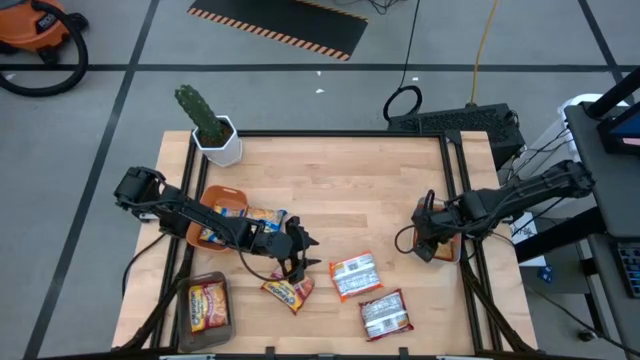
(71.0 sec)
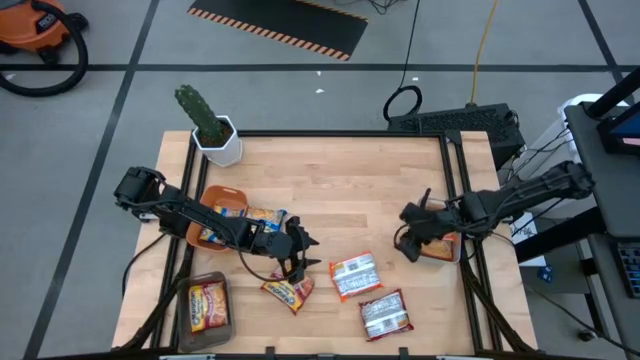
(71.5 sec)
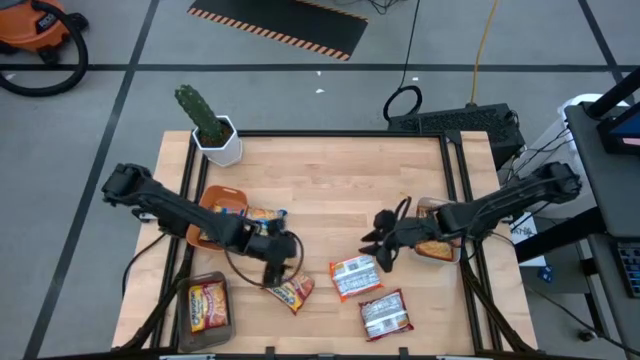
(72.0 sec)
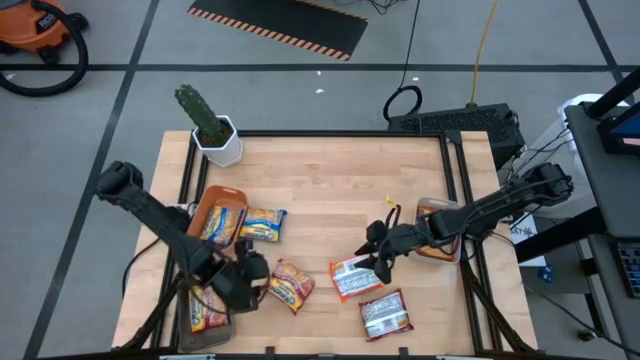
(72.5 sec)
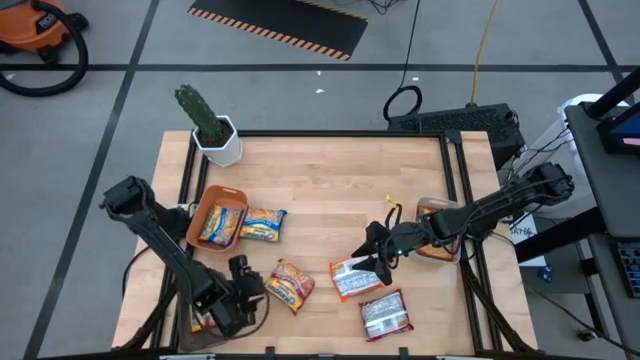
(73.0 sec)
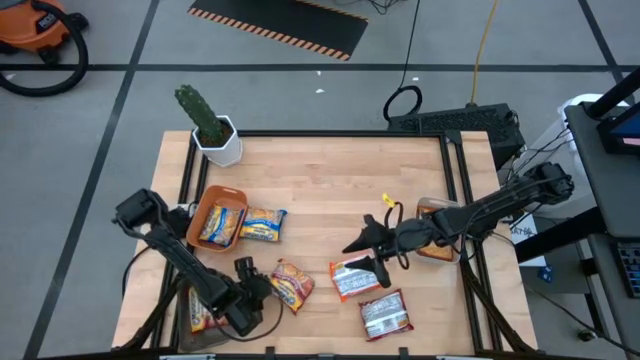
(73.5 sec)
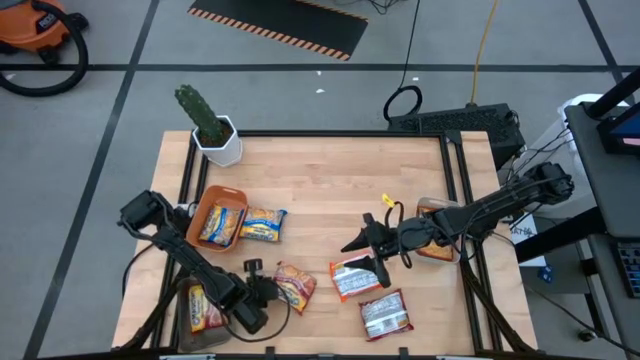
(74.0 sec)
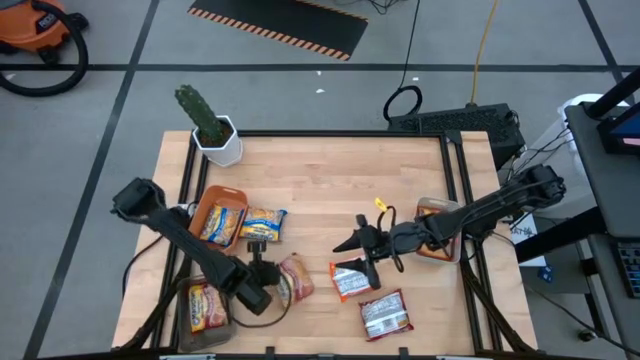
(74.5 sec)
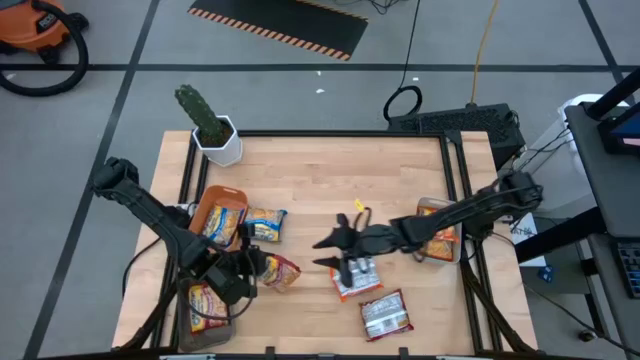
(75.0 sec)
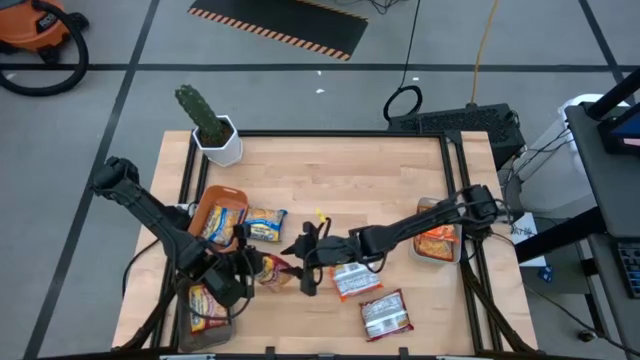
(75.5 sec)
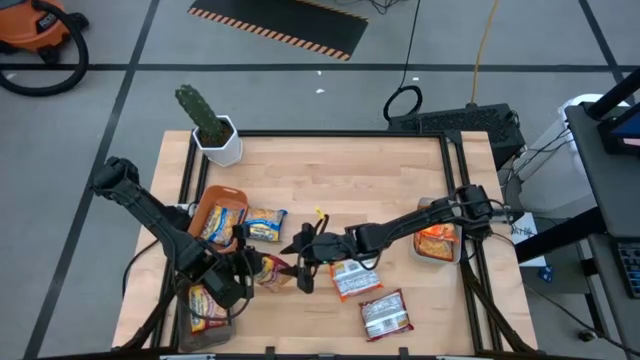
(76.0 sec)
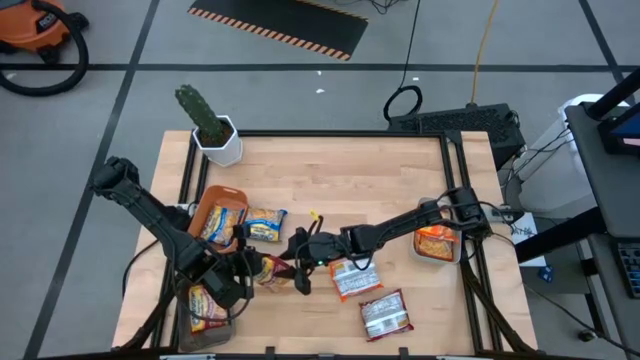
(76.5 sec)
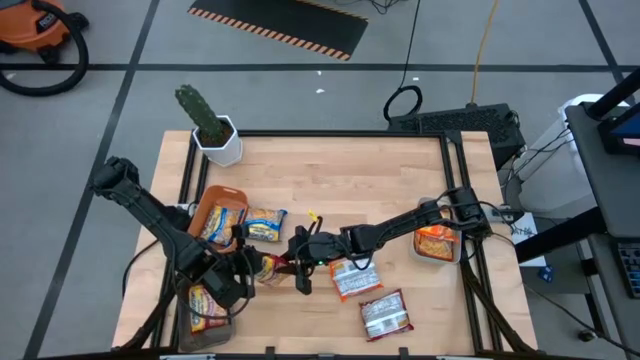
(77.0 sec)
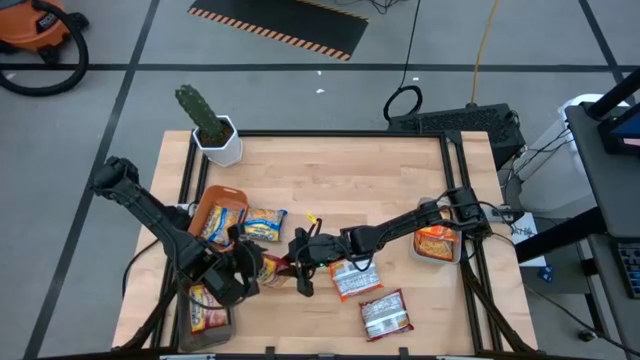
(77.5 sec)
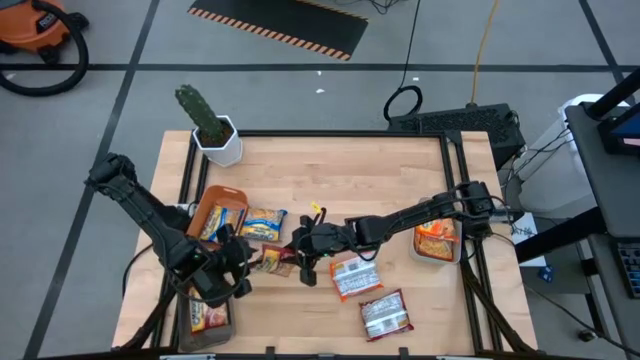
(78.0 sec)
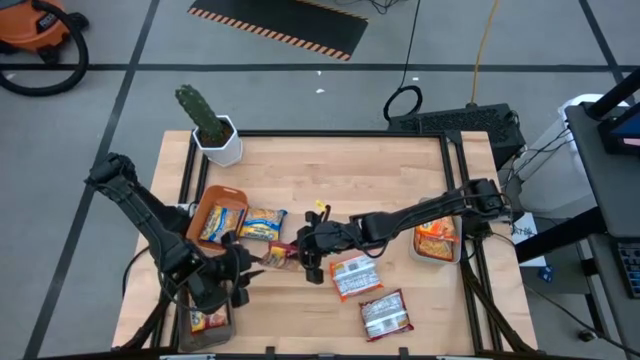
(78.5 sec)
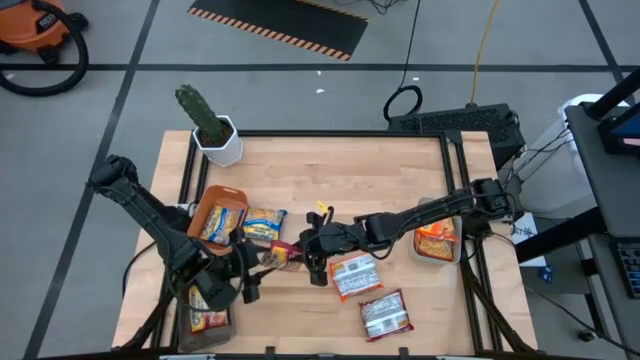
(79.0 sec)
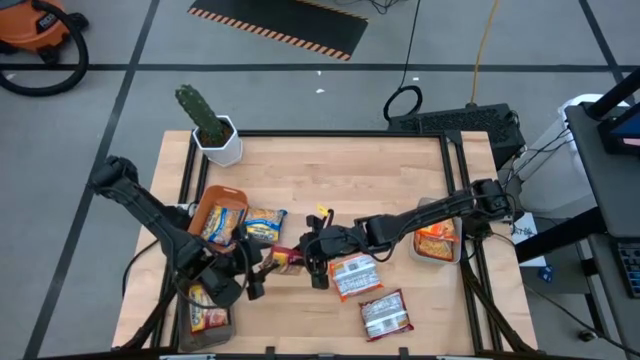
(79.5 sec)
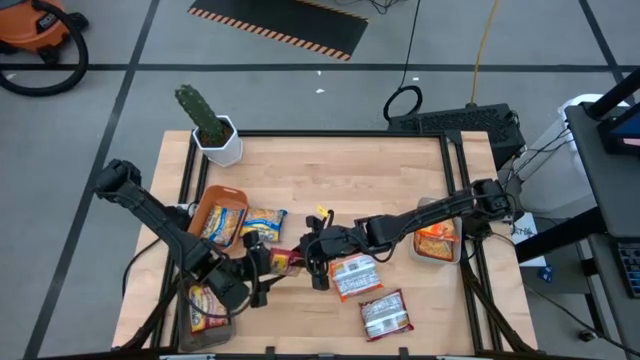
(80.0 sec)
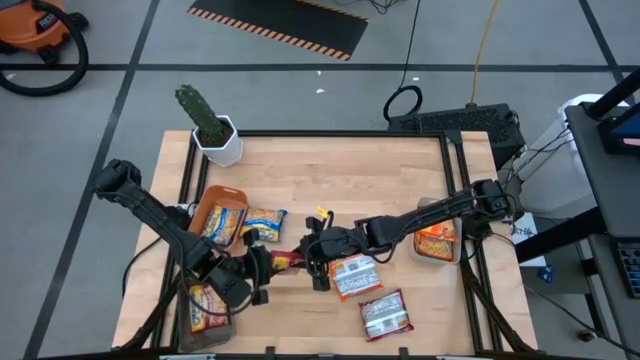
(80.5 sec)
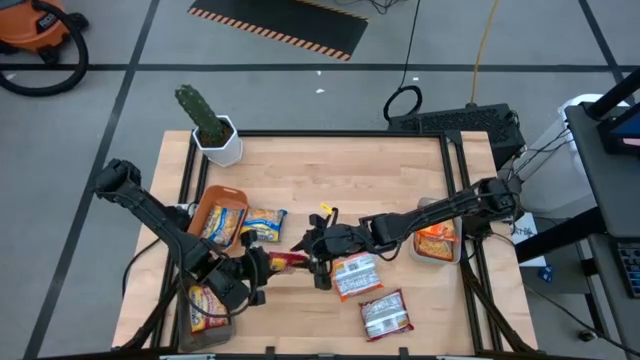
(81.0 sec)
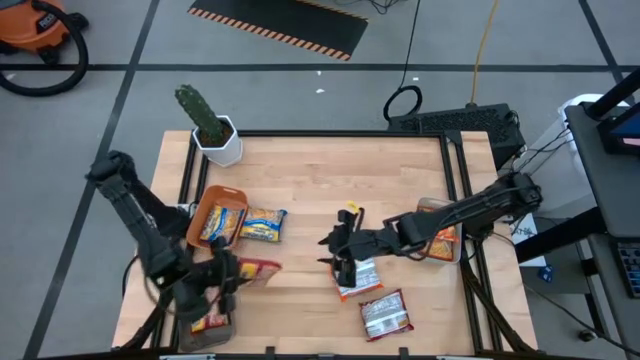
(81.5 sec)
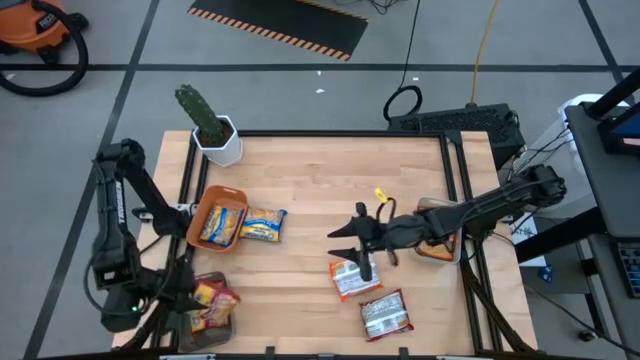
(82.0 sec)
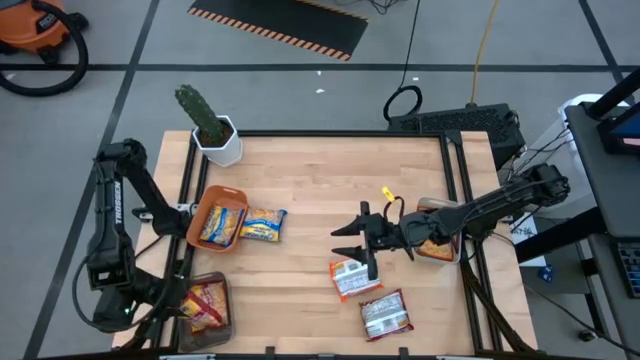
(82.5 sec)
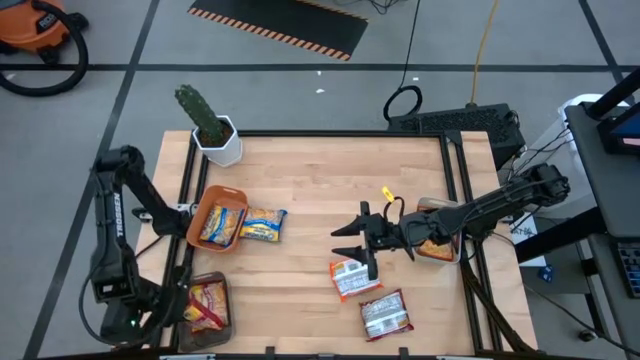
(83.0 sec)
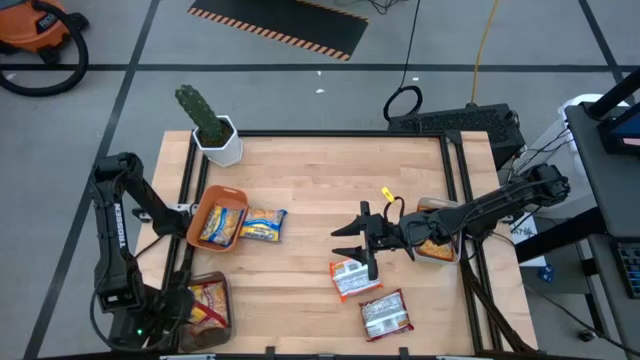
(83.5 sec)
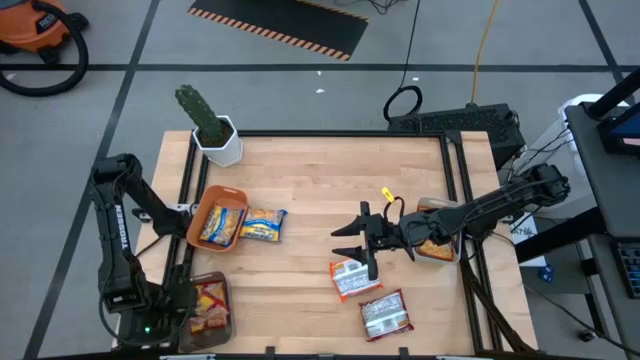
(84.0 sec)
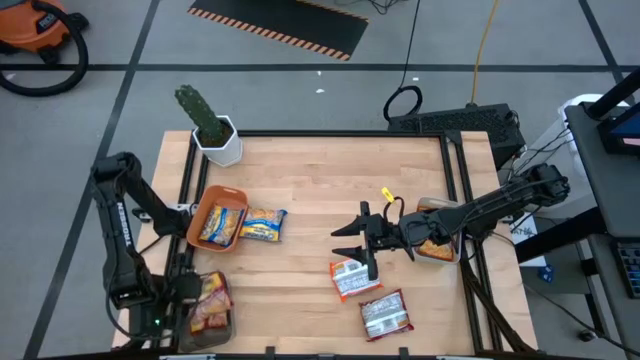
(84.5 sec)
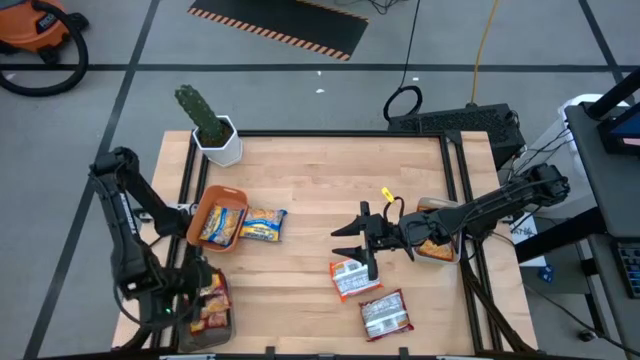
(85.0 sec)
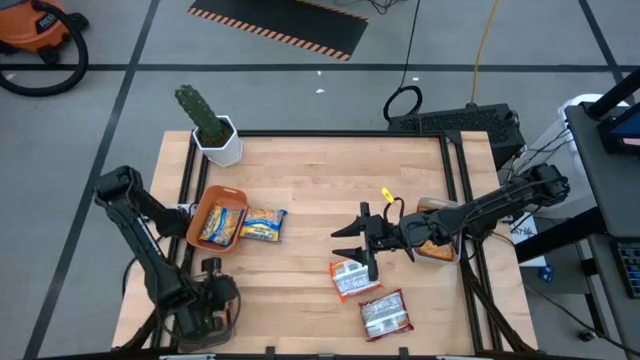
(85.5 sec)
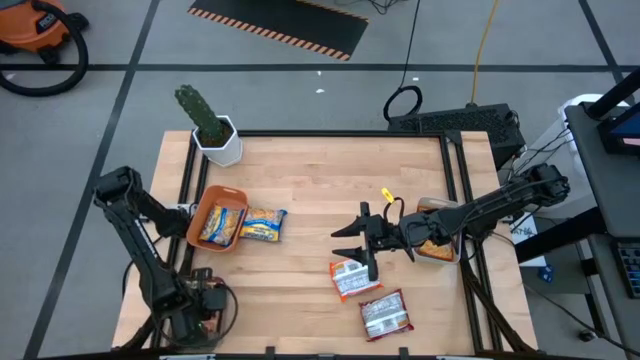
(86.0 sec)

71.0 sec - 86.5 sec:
Task: Sort Maruchan noodles
Put the left red noodle pack into the black bin

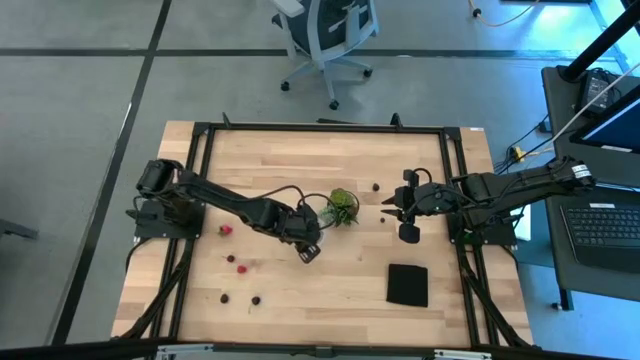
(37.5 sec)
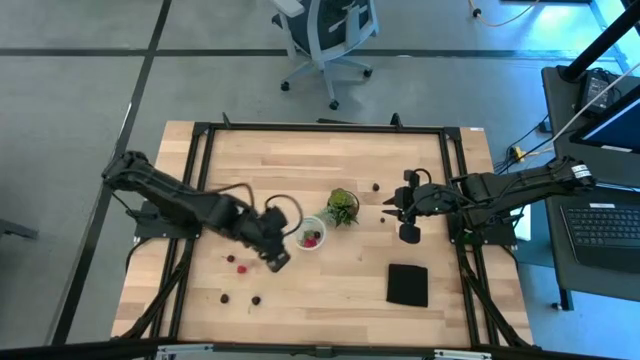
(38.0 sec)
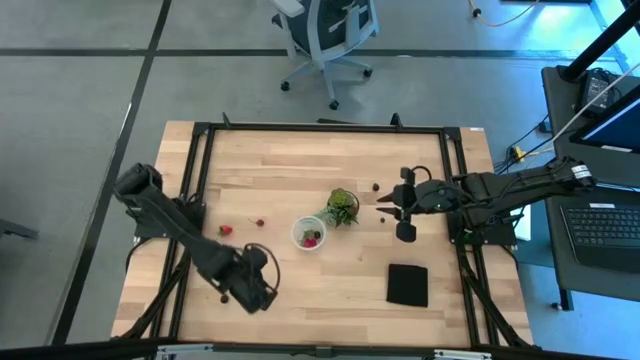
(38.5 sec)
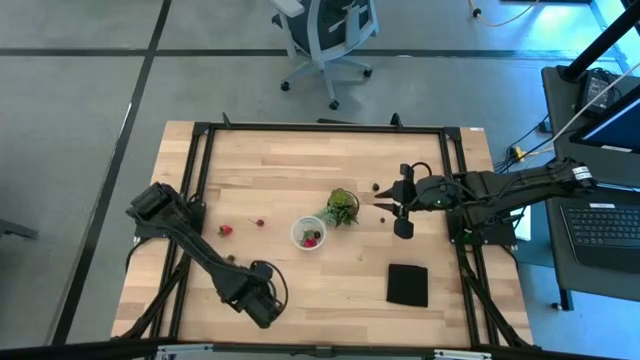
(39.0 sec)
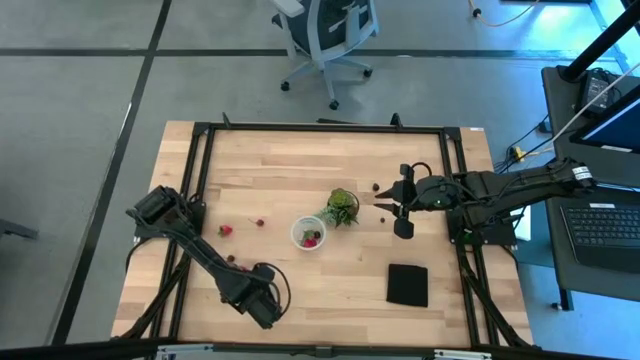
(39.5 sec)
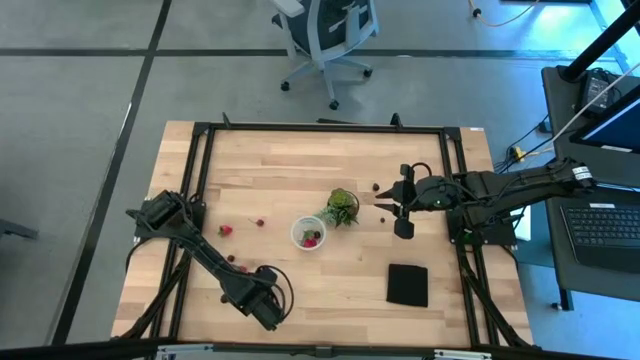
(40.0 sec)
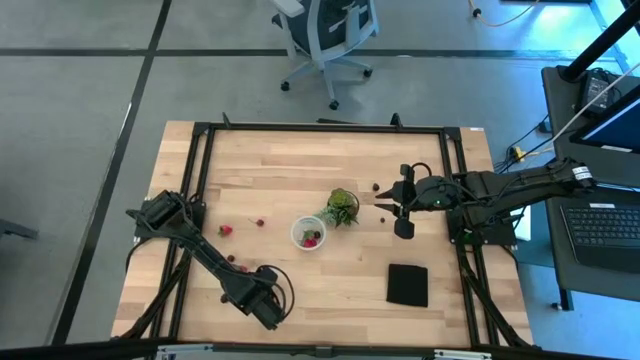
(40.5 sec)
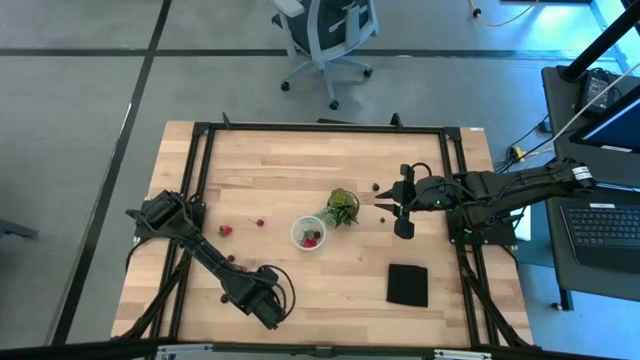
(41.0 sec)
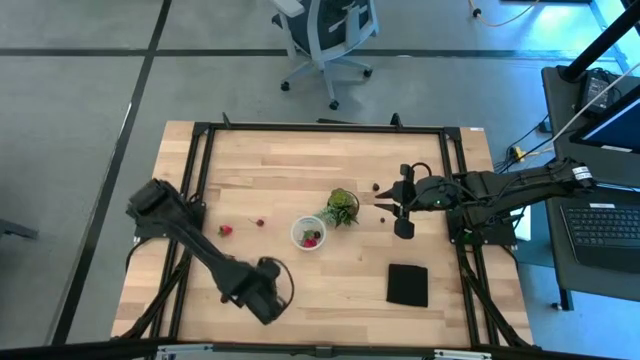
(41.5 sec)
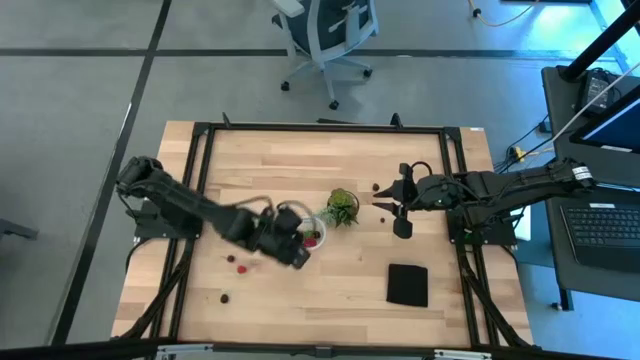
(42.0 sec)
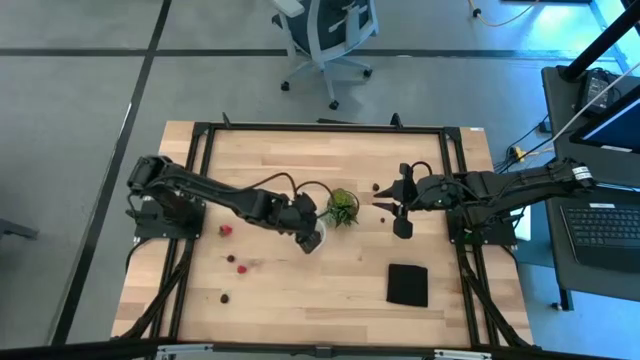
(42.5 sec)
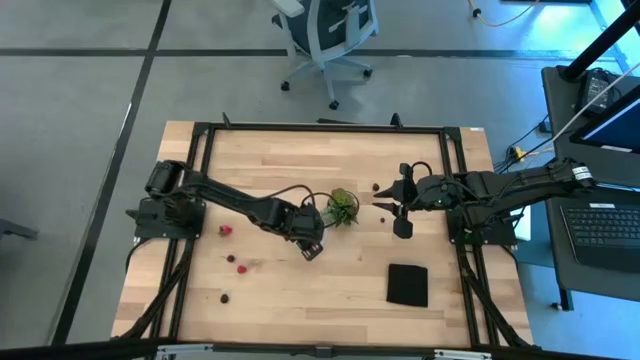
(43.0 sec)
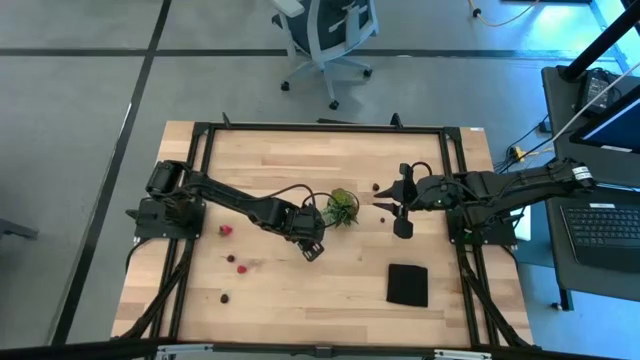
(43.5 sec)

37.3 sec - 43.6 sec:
Task: Pick and placing Produce into tupperware
Put the black cherry into the transparent container
